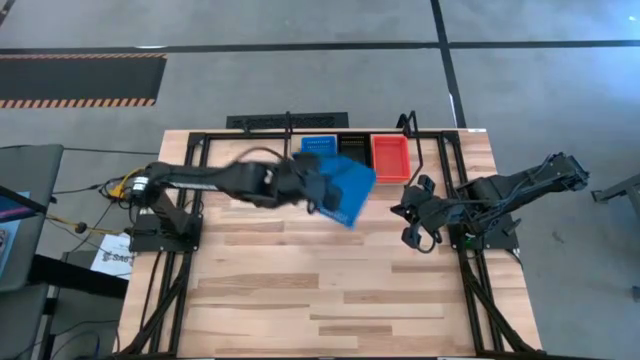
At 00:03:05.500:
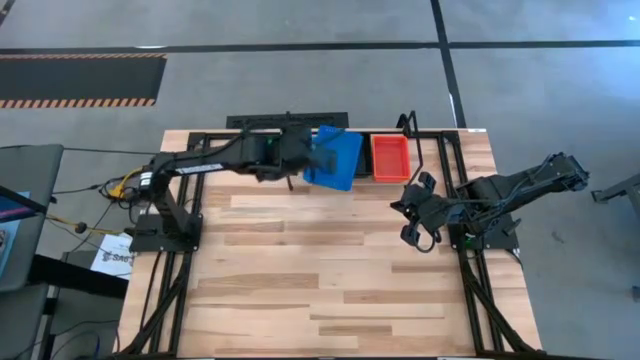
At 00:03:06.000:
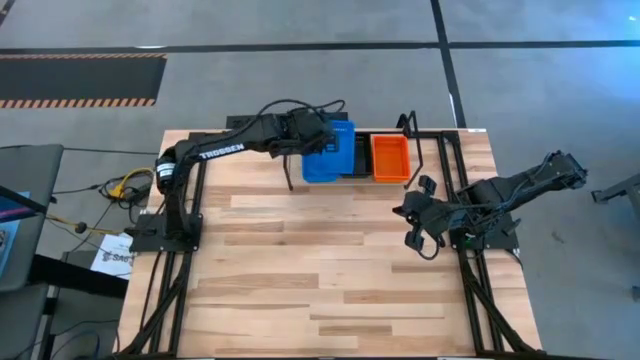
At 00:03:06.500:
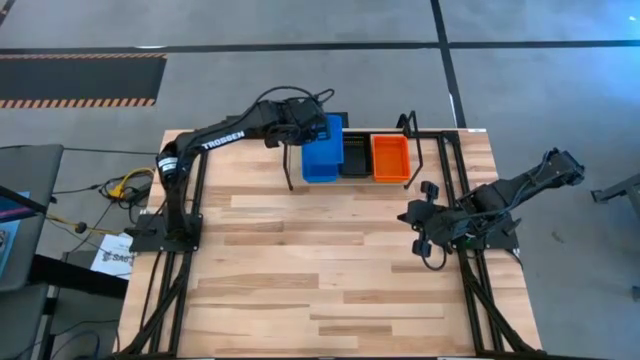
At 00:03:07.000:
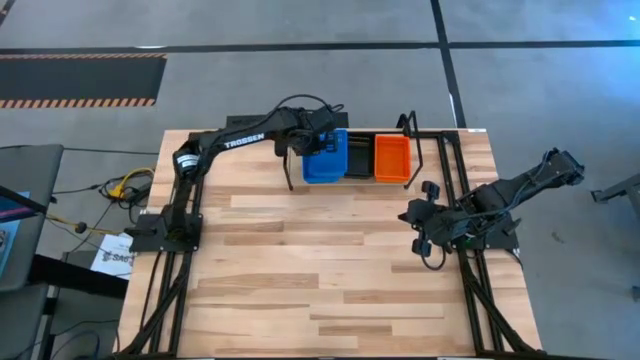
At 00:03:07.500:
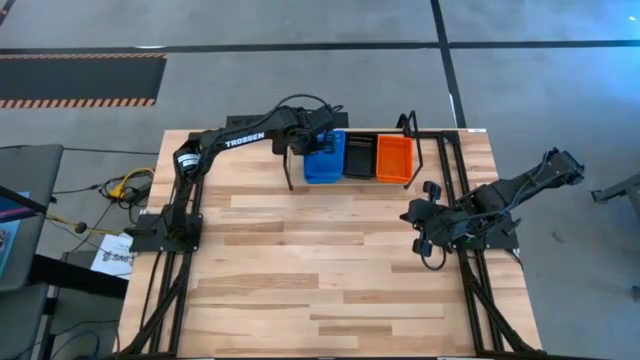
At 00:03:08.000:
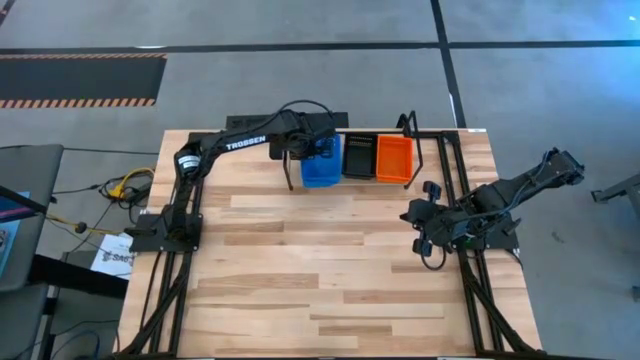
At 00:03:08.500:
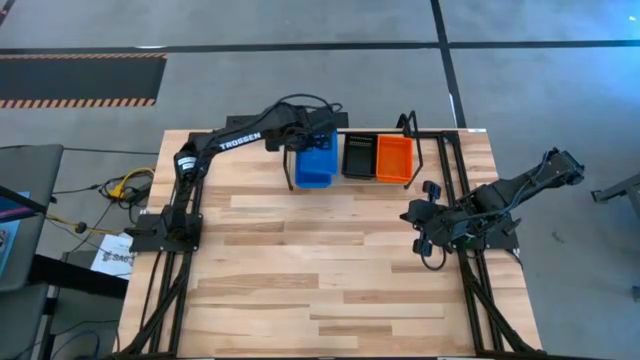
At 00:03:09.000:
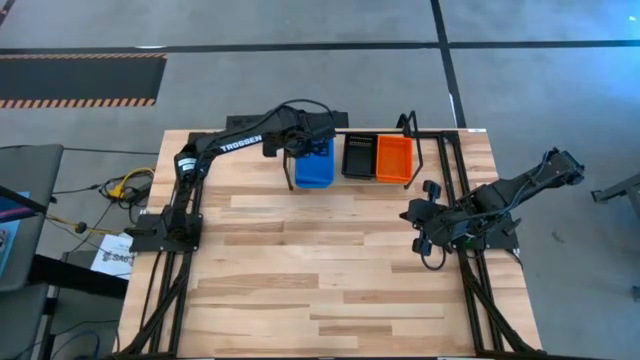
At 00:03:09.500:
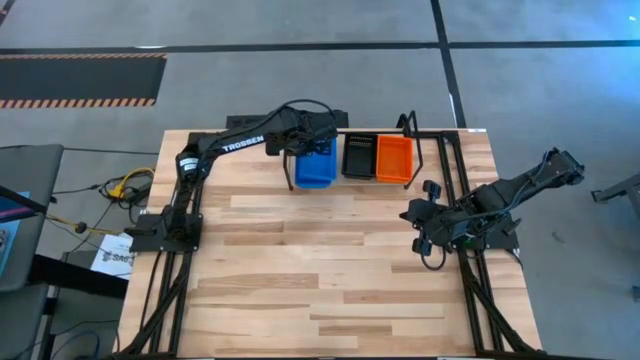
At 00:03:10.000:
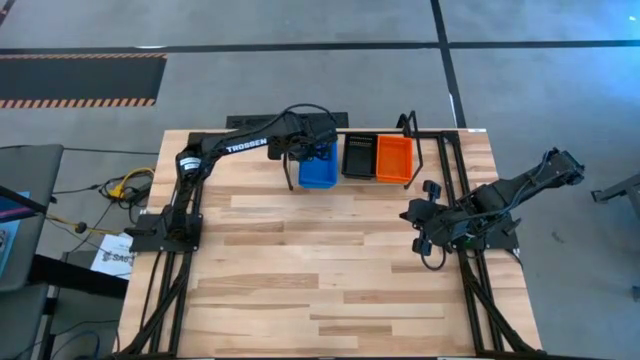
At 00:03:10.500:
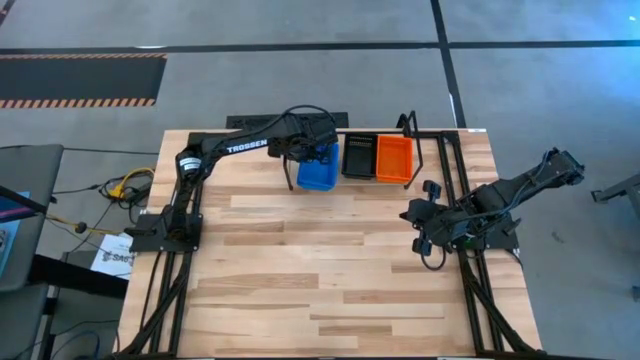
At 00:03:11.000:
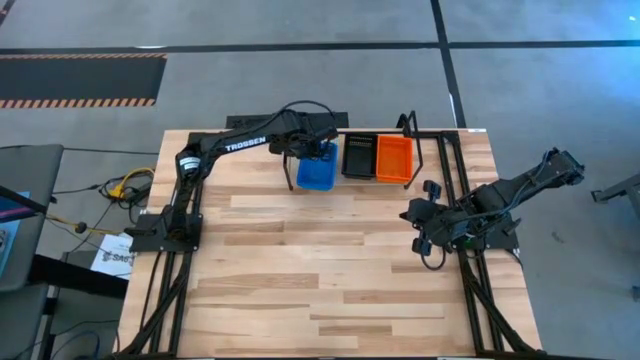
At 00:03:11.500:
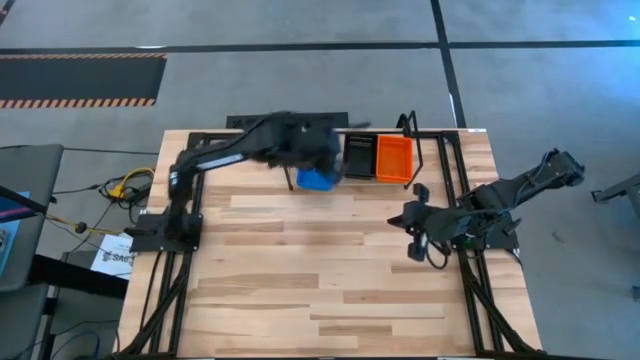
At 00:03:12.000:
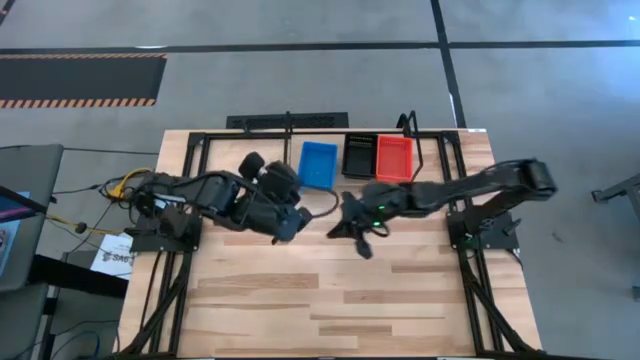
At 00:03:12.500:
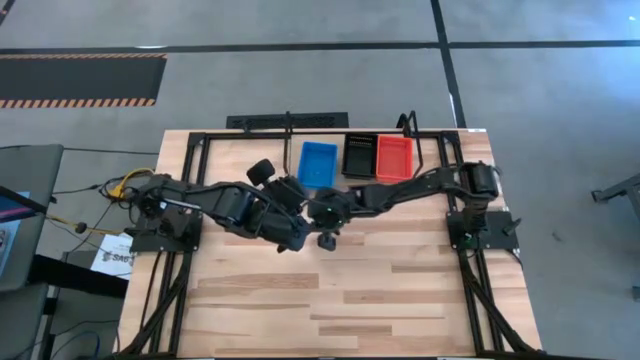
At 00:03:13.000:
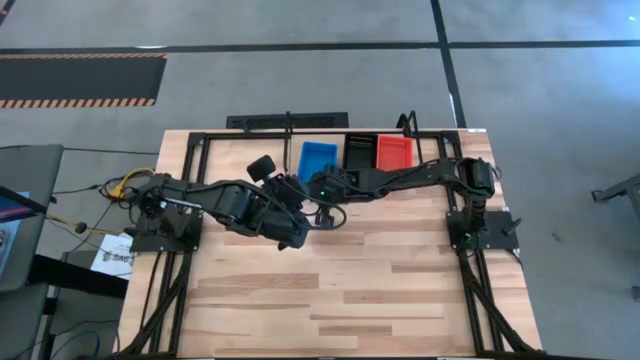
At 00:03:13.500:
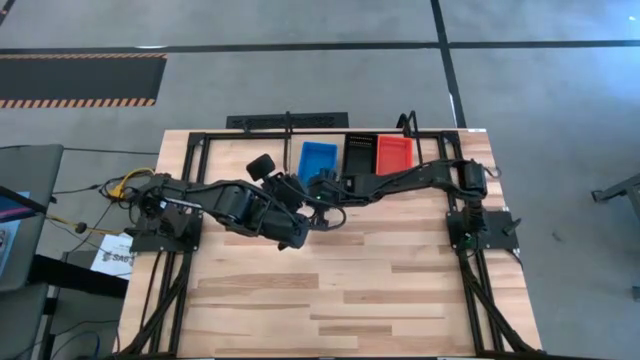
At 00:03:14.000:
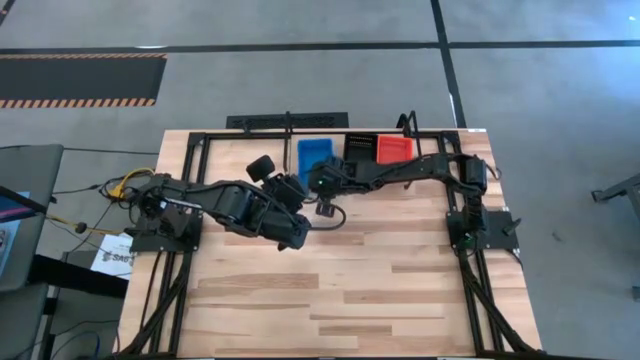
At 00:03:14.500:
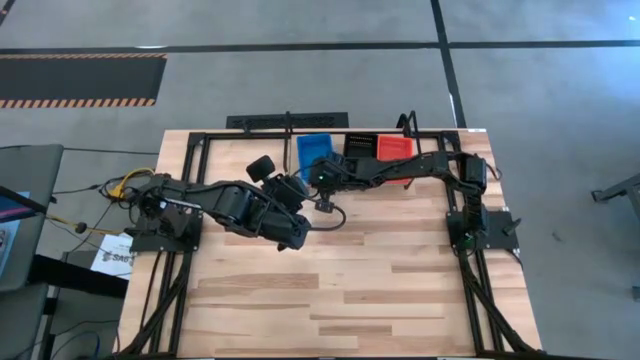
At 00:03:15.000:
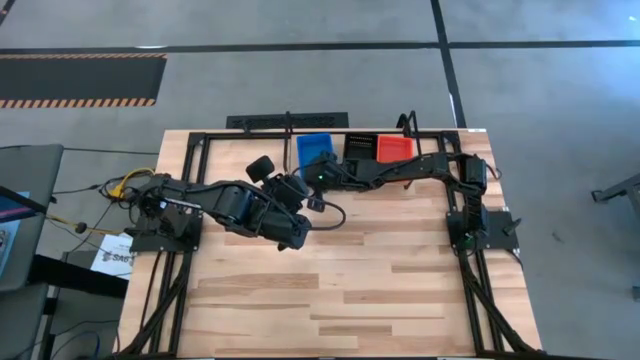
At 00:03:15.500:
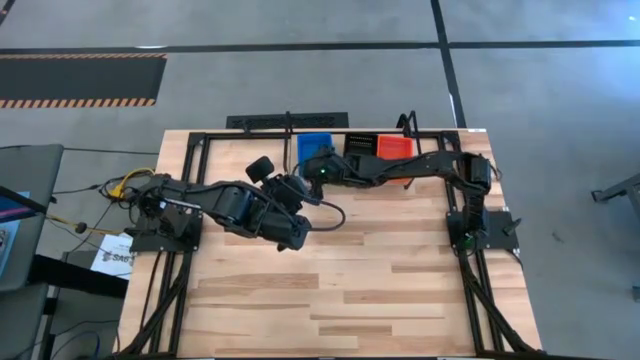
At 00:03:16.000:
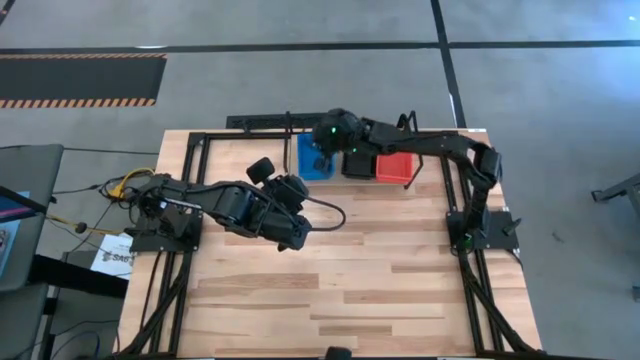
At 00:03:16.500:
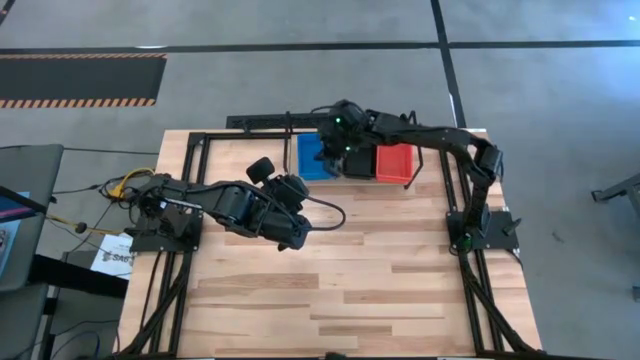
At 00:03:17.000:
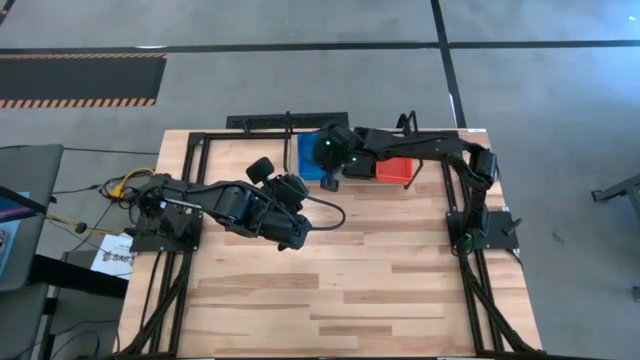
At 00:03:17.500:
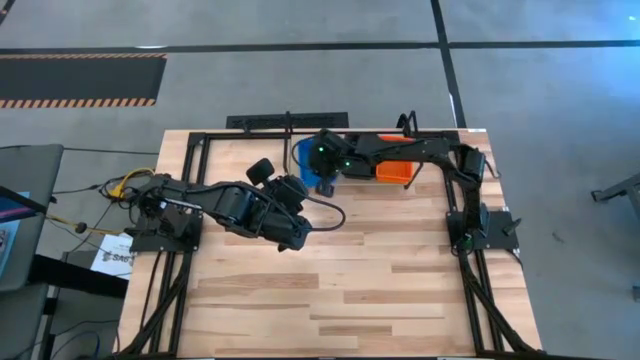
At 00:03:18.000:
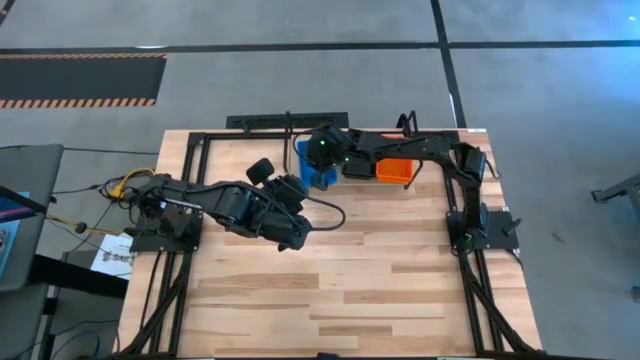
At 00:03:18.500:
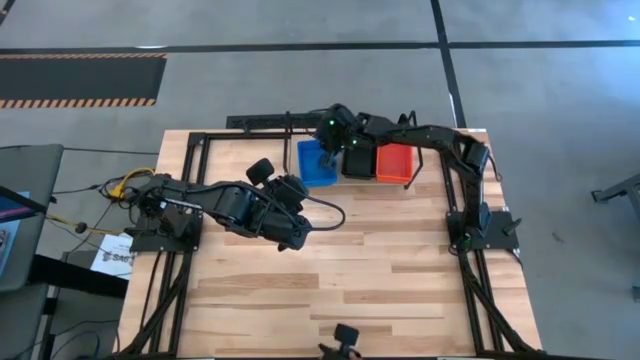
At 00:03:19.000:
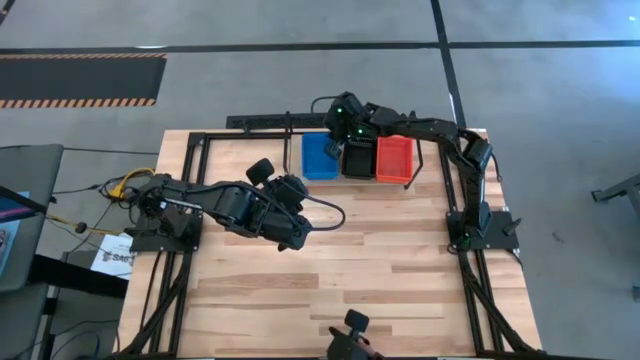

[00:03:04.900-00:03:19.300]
Task: Stack baskets on shelf by color
Stack the blue bin on top of the blue bin on the shelf

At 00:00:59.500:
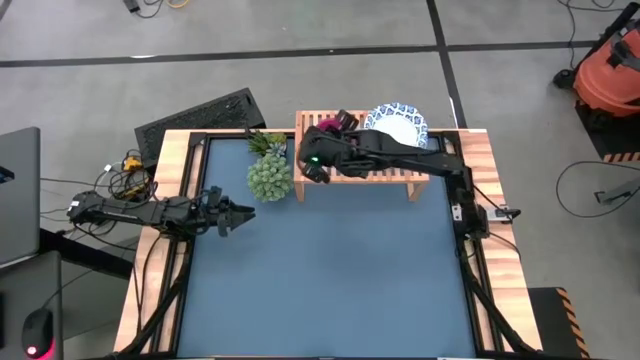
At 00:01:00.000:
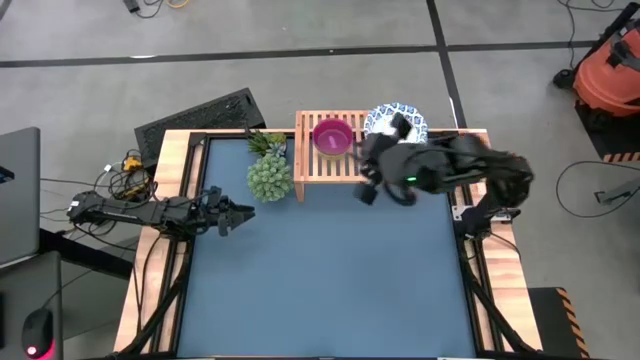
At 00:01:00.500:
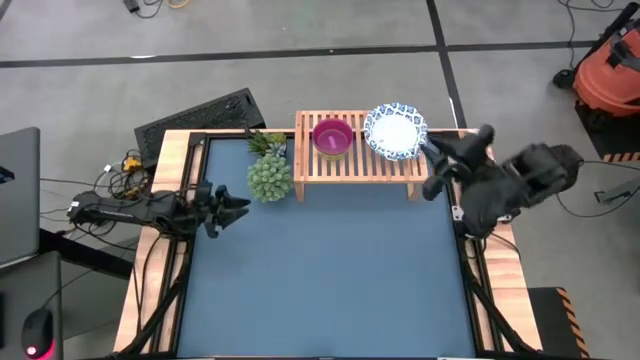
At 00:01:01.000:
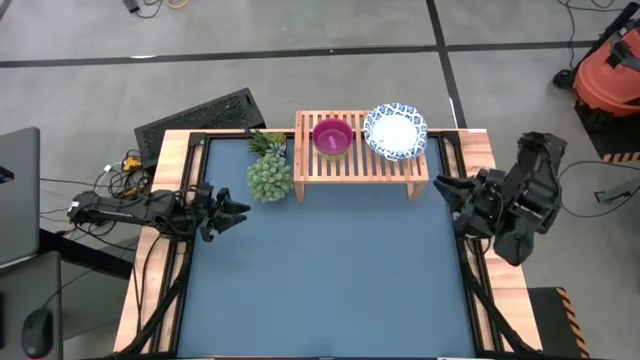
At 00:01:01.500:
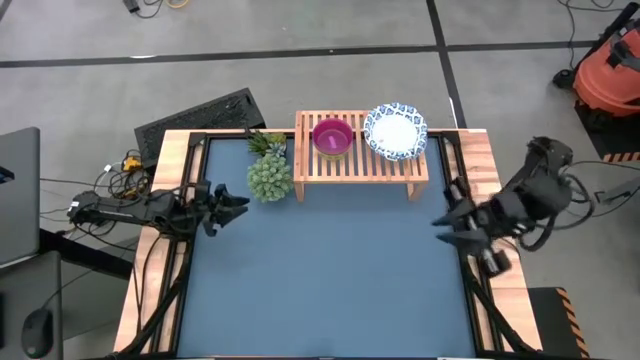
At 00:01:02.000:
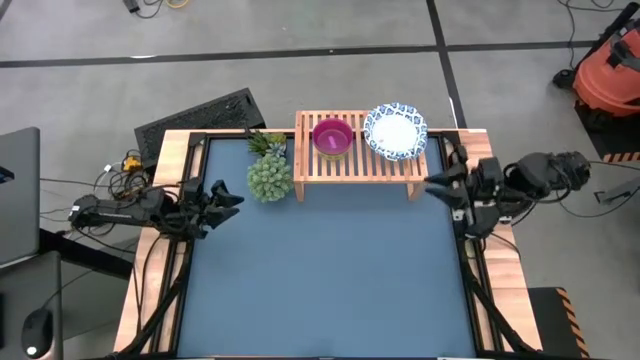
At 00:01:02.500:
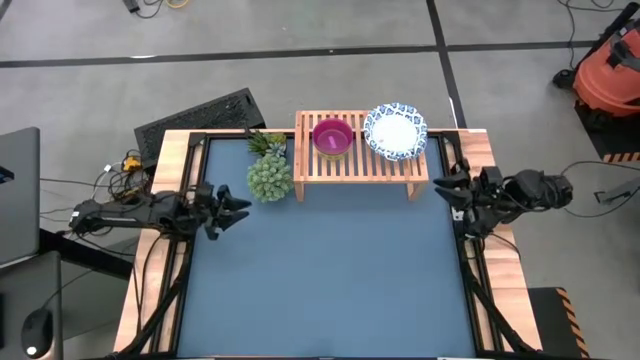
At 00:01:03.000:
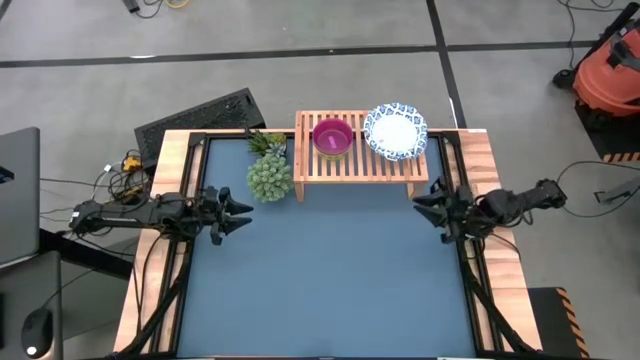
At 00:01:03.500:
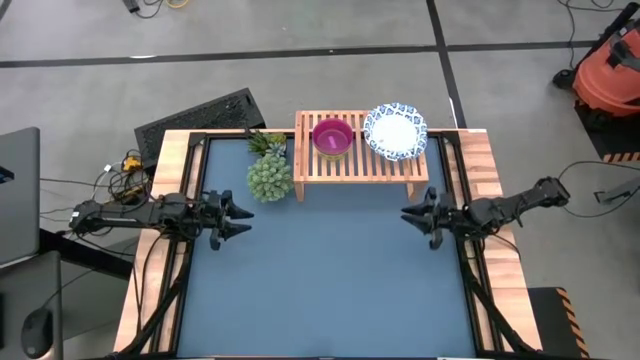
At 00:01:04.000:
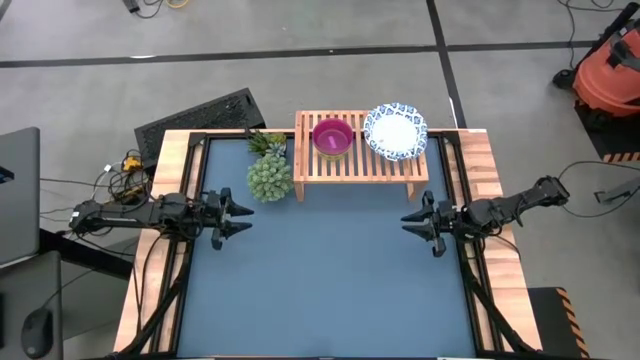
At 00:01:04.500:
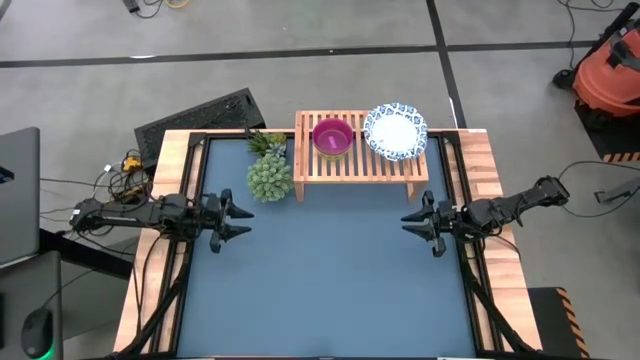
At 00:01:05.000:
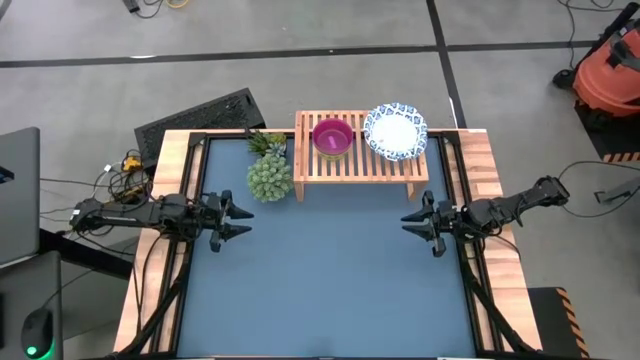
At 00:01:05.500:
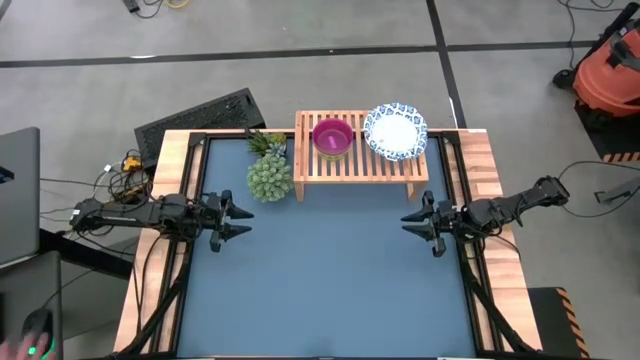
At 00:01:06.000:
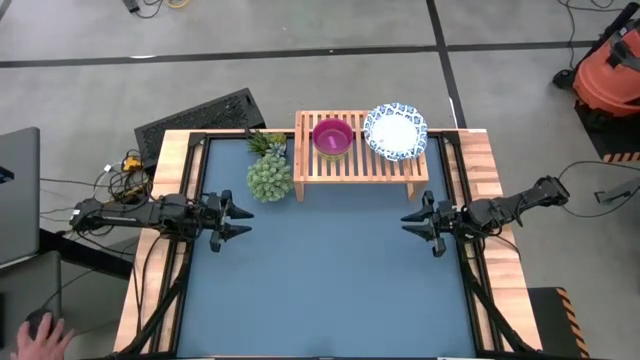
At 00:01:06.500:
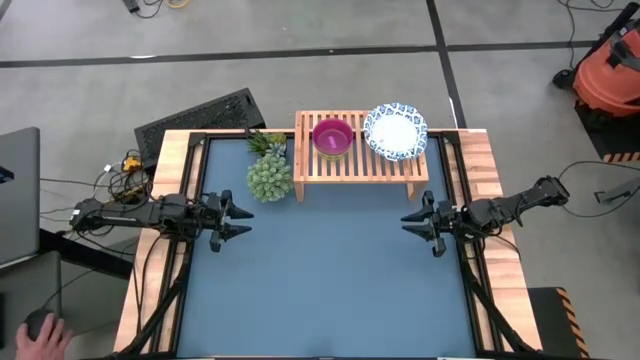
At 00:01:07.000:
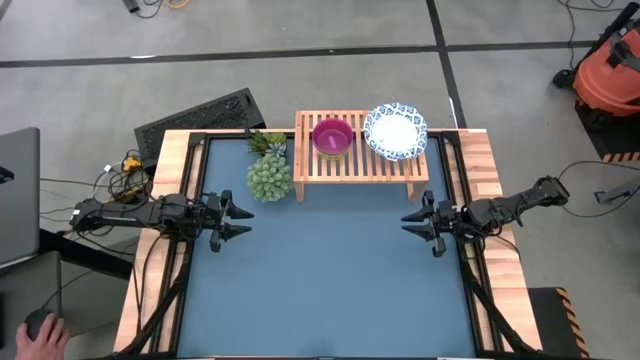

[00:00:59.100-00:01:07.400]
Task: Place and stack bowls onto a shelf
Return to Home Position
